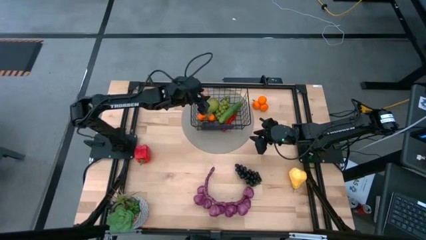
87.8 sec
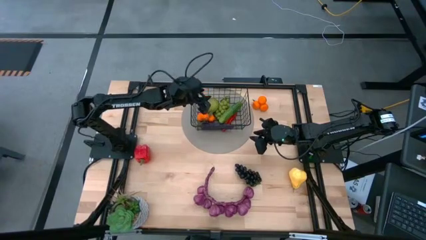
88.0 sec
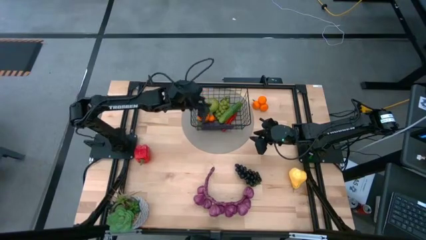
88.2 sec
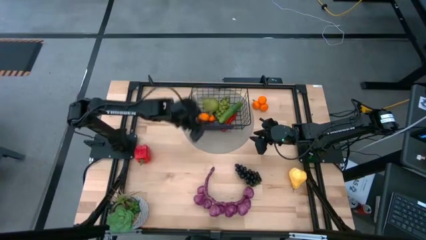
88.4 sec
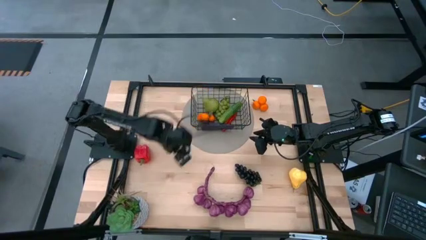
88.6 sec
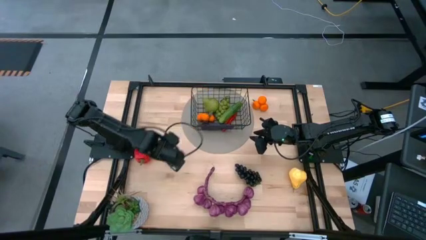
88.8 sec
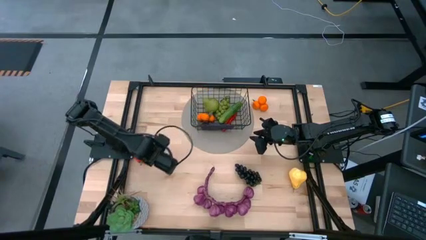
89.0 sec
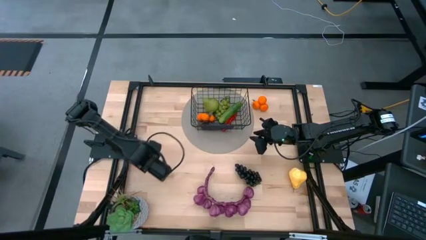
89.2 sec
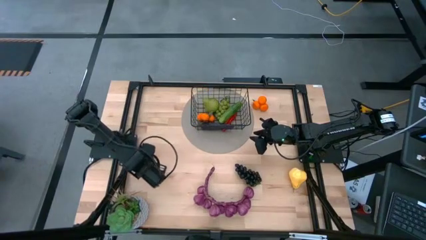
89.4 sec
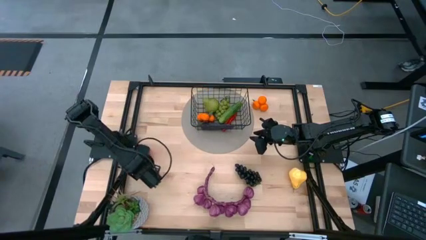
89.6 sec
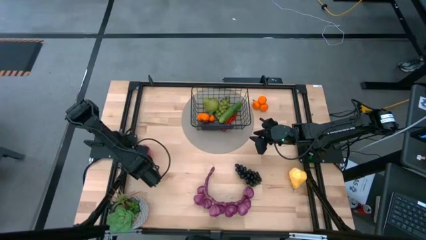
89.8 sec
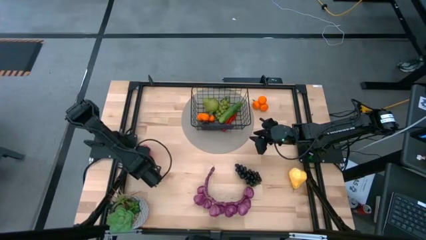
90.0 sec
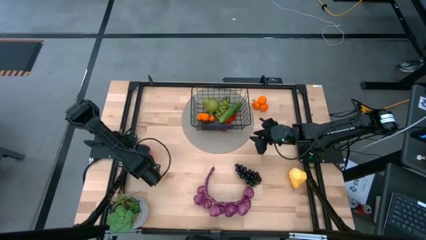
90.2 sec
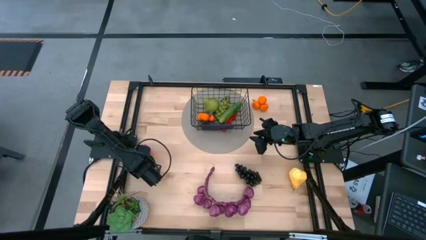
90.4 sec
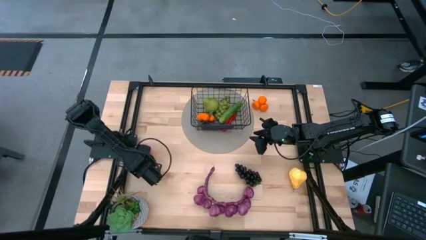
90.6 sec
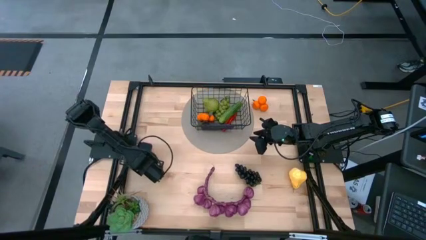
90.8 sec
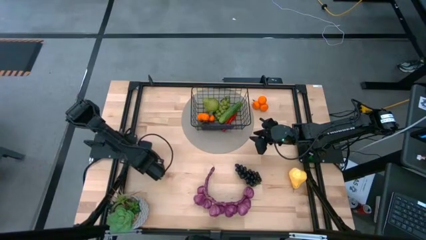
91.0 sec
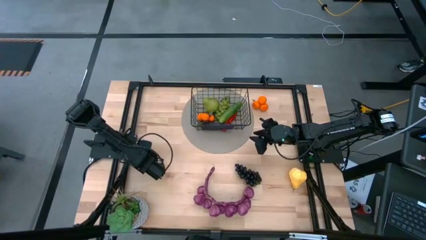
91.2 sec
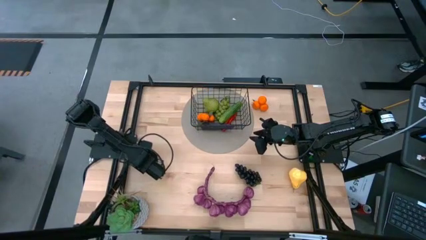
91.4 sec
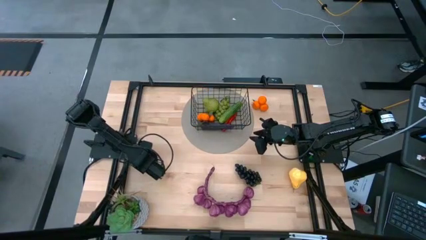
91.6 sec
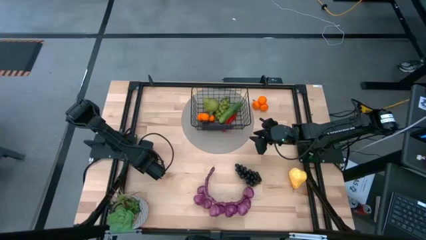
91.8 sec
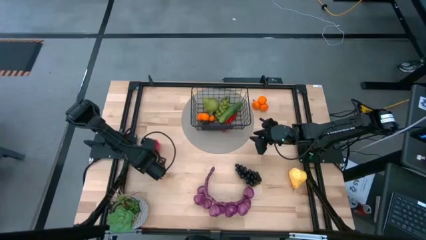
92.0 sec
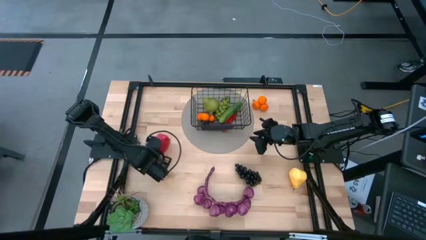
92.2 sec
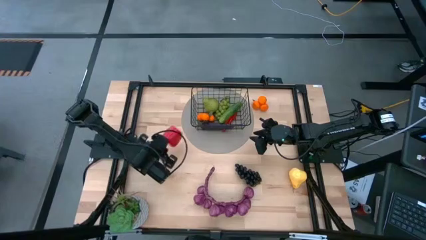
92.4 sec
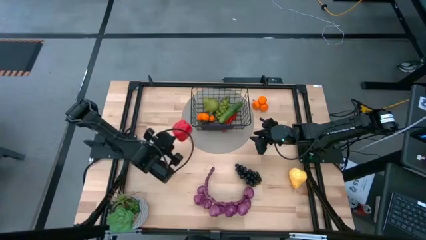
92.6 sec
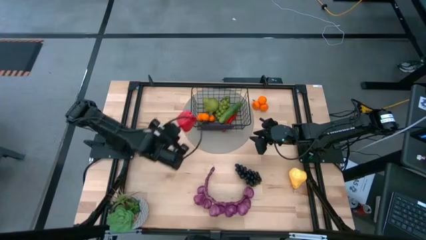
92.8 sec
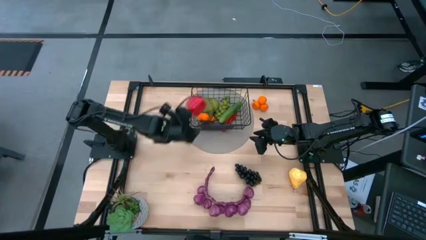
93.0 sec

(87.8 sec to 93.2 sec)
Task: Build produce basket
Put the red bell pepper into the black wire basket

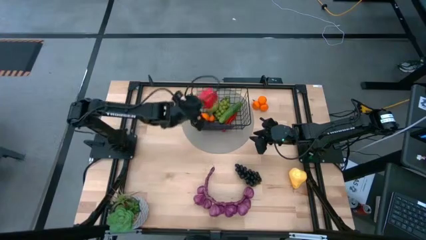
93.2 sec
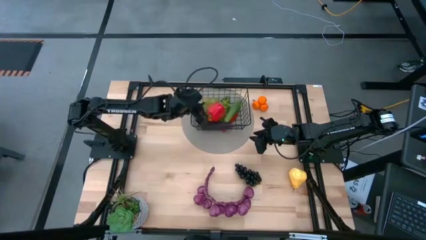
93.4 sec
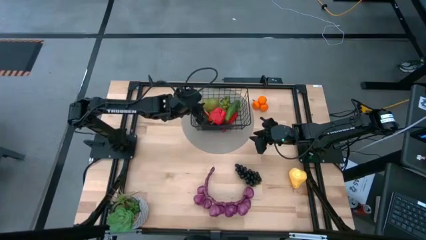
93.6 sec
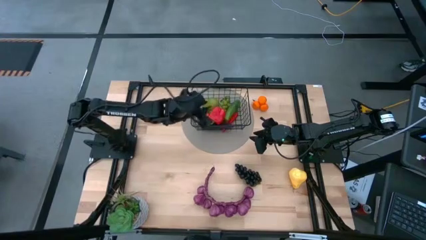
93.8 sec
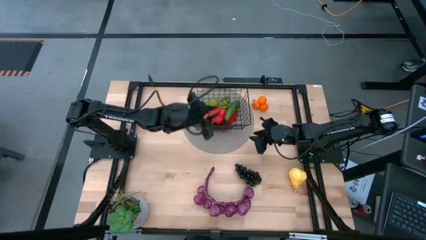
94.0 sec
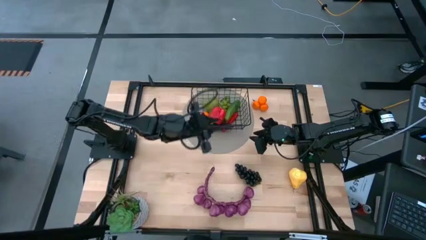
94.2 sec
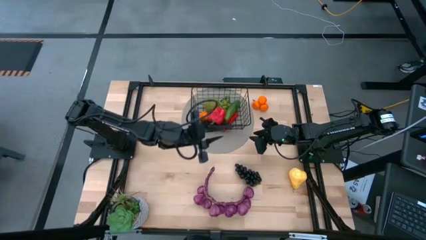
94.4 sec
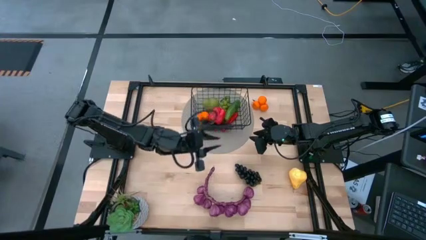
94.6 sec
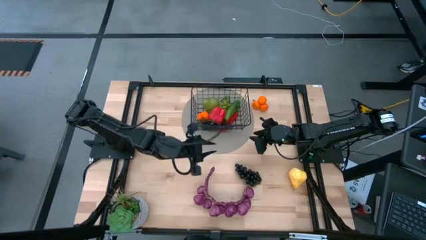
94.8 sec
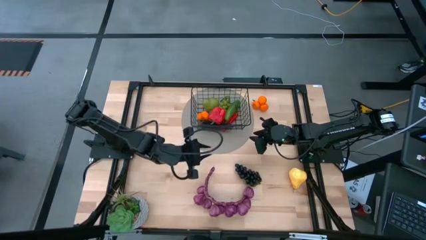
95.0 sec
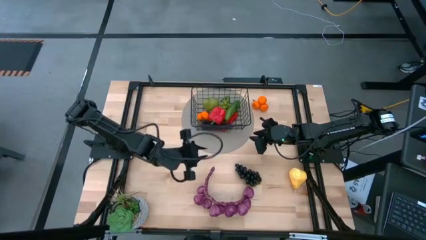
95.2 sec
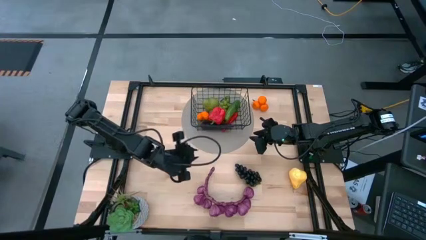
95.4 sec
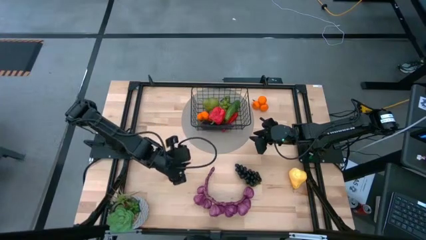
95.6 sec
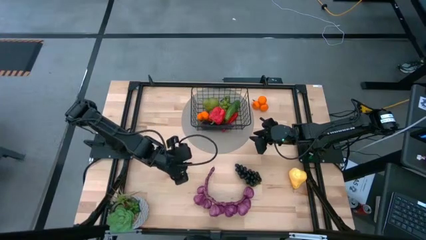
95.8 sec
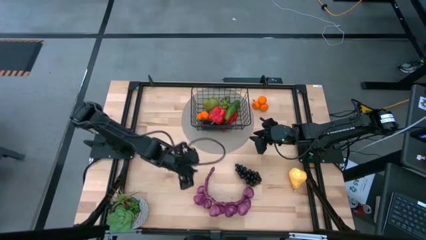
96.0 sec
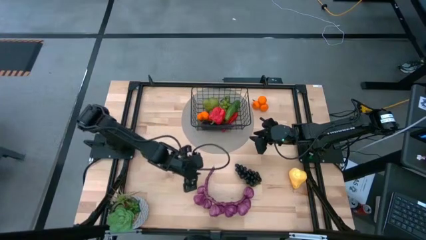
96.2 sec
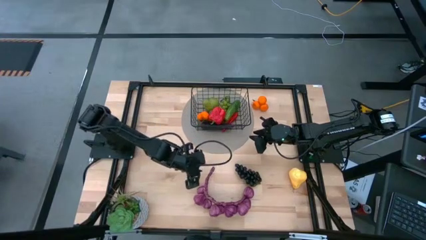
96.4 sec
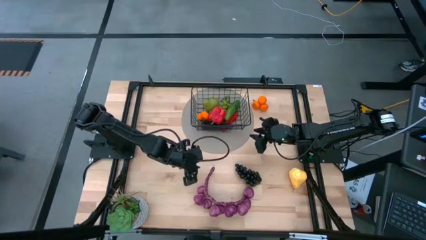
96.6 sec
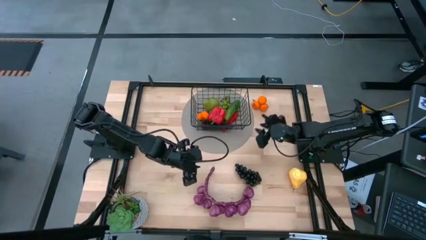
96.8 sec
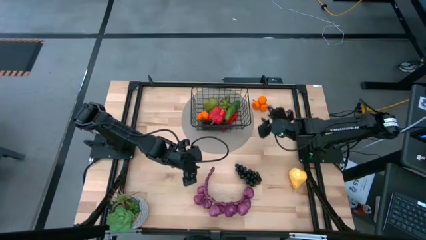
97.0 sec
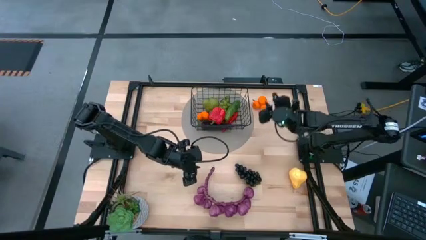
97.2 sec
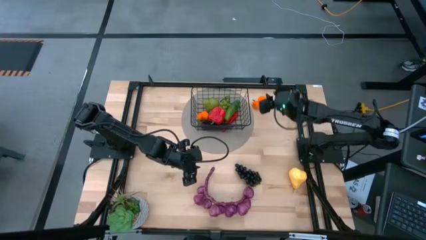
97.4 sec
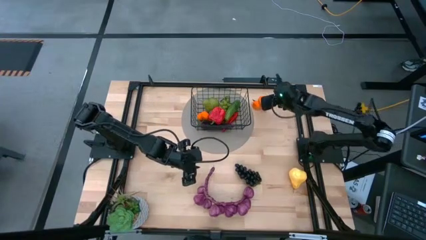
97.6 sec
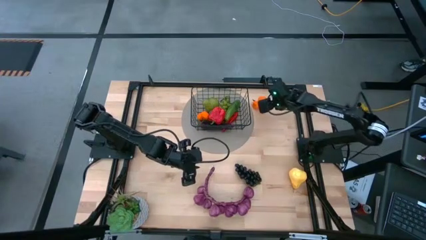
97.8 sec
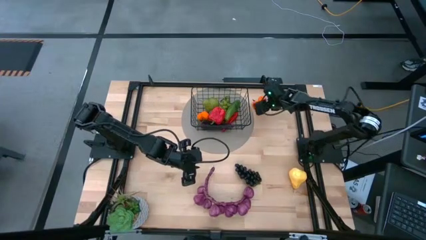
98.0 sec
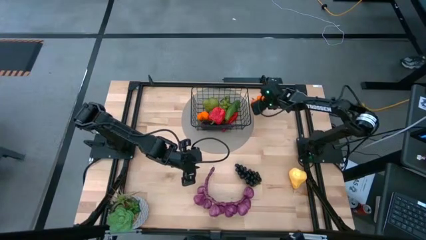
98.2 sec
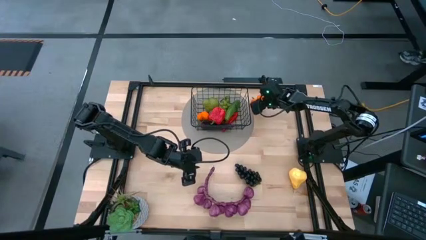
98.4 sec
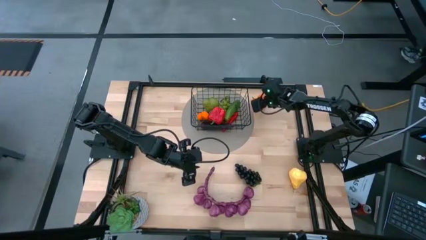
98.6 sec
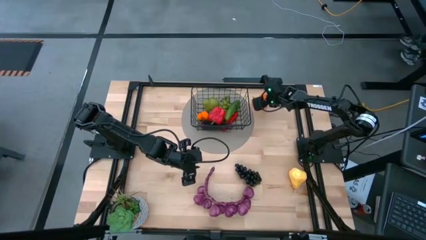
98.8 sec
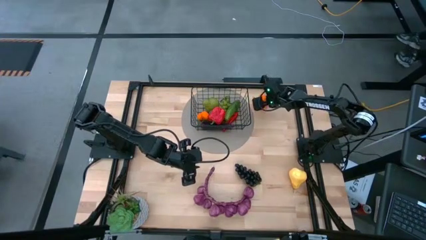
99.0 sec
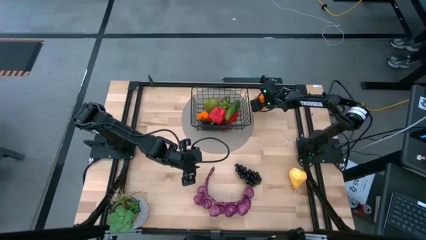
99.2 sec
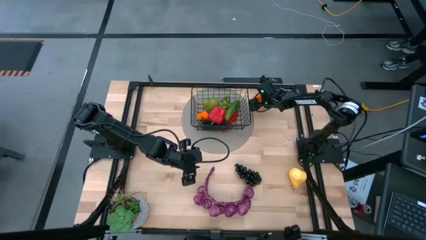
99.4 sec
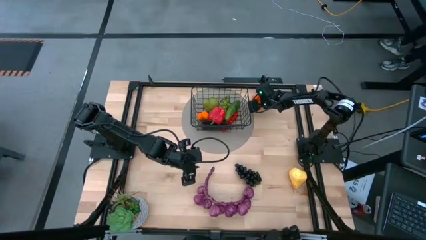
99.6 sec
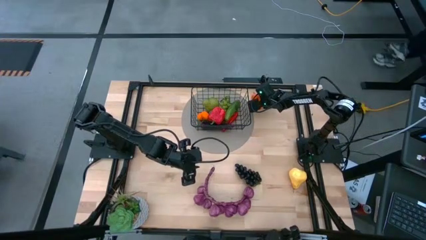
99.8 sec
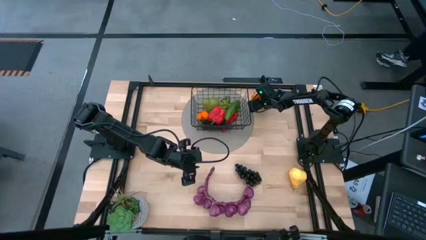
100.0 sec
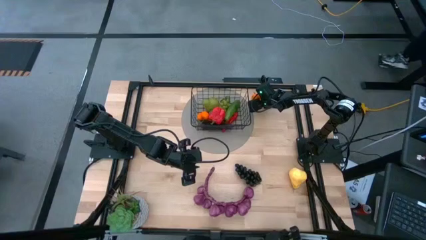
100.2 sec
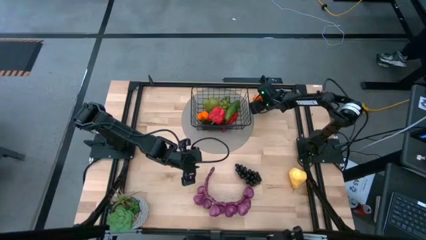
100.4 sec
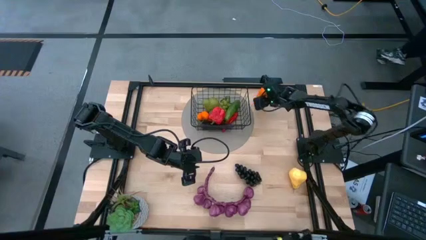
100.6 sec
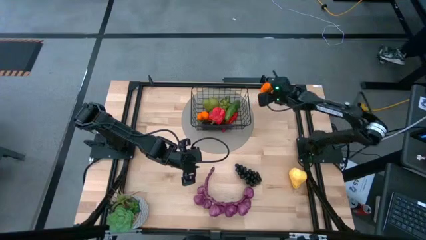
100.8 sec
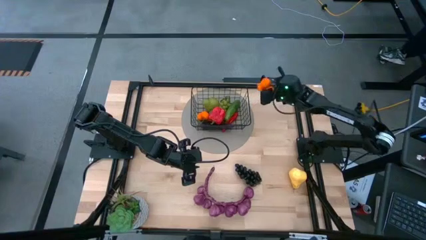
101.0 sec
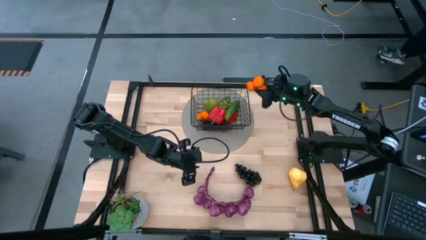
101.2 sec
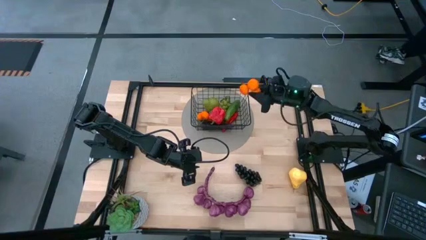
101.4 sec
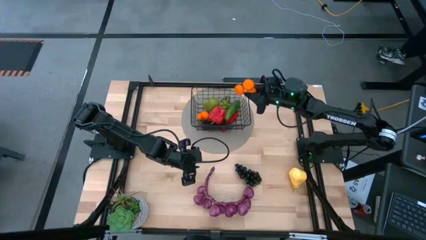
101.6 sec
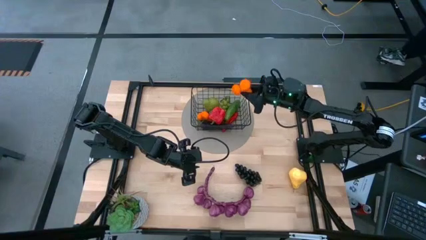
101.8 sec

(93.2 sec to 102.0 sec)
Put the tangerines into the black wire basket

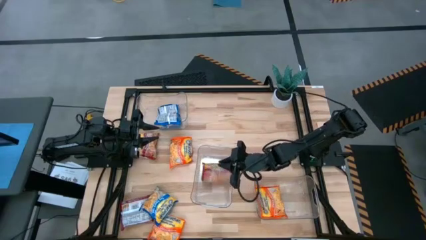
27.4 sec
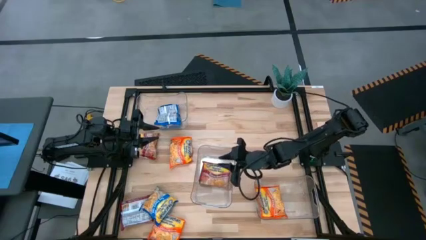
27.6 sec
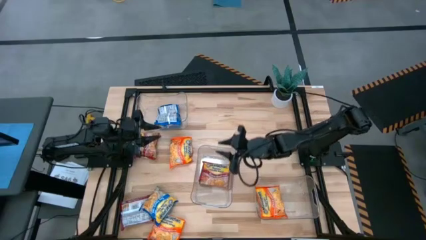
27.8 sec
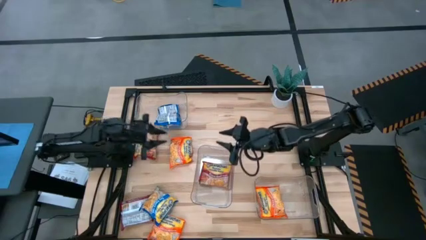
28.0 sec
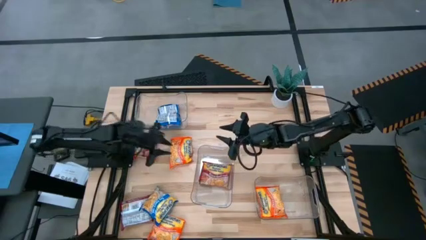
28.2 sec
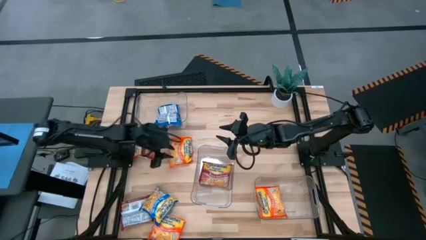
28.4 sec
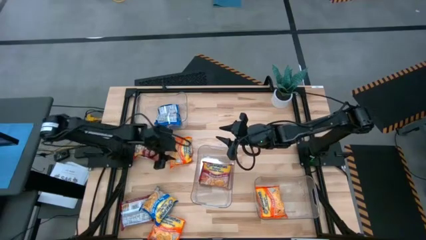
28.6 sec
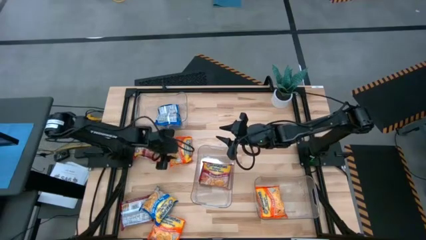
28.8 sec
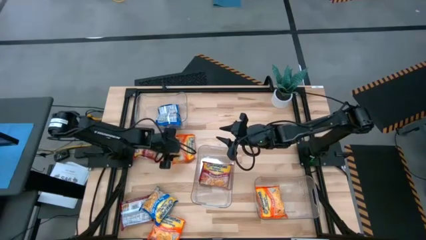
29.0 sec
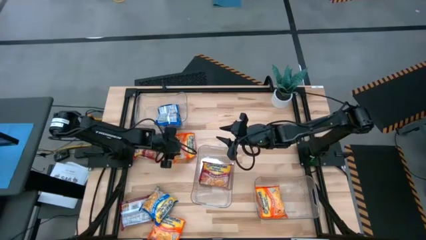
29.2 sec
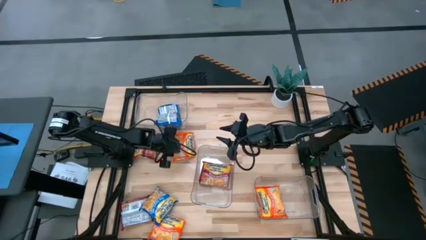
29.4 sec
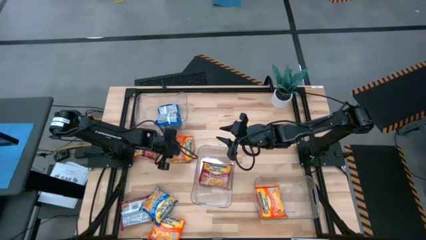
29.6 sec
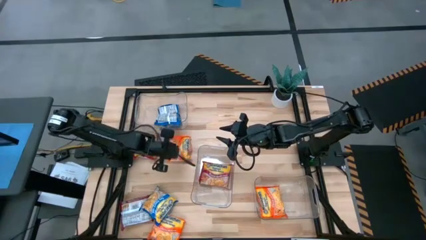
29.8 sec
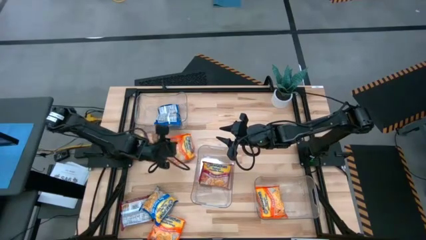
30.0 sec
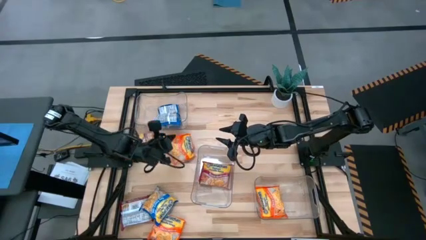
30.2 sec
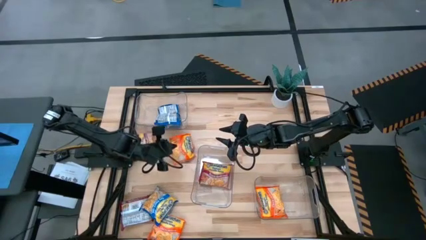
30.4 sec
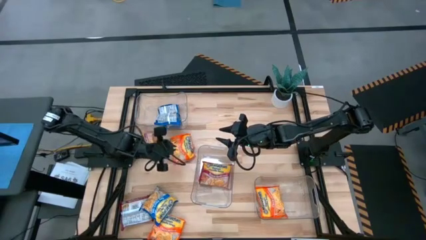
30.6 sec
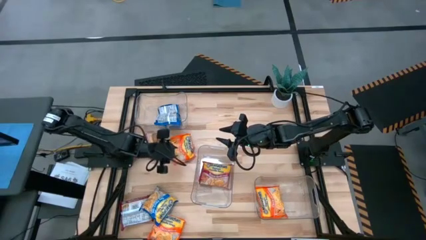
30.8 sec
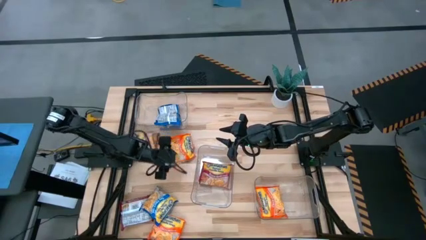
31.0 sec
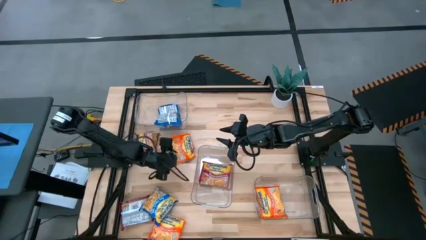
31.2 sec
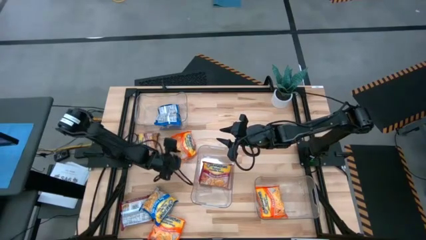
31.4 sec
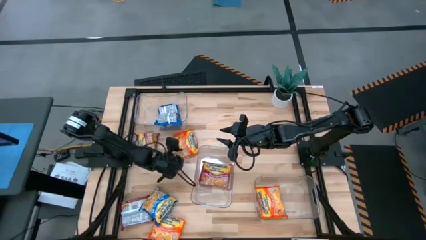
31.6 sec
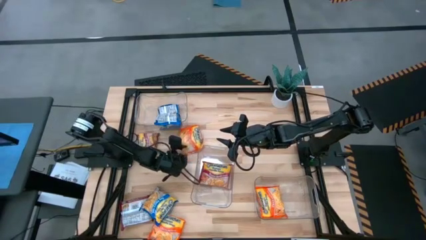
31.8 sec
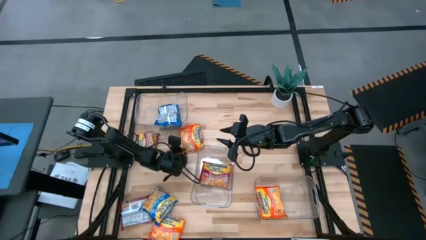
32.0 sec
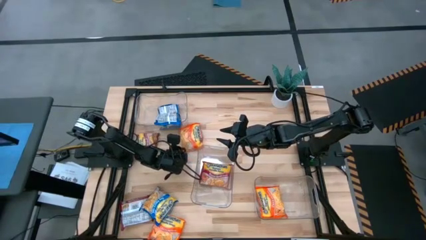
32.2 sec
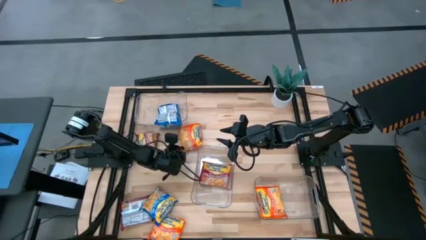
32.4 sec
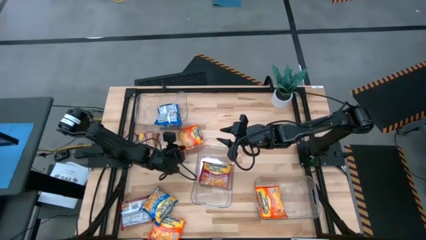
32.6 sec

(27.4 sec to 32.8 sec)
Task: Sort Maruchan noodles
Put the top orange noodle pack into the bottom transparent bin
